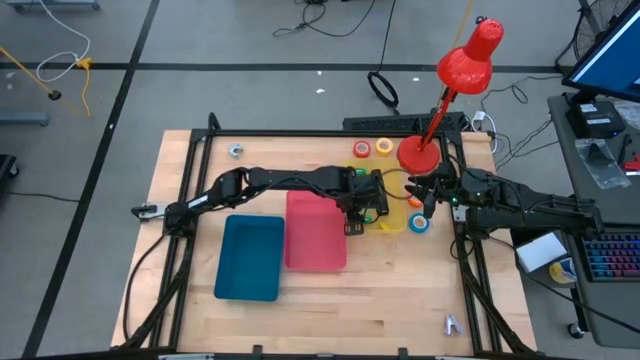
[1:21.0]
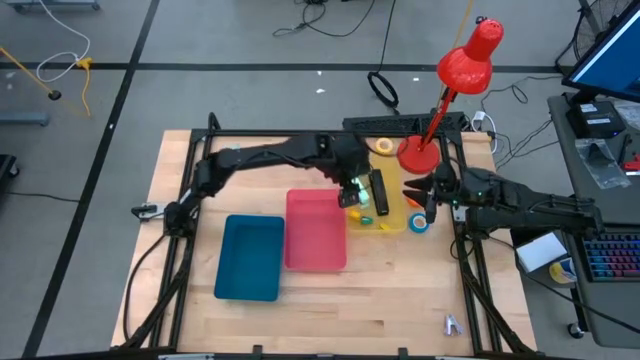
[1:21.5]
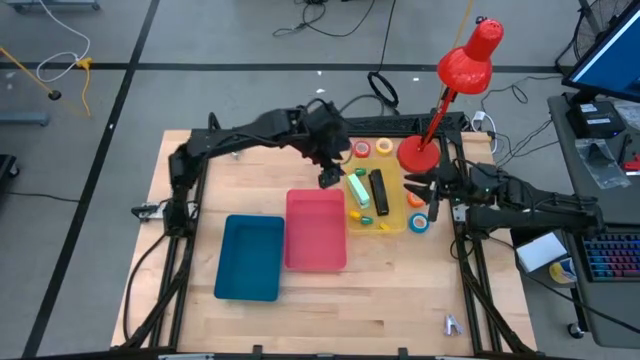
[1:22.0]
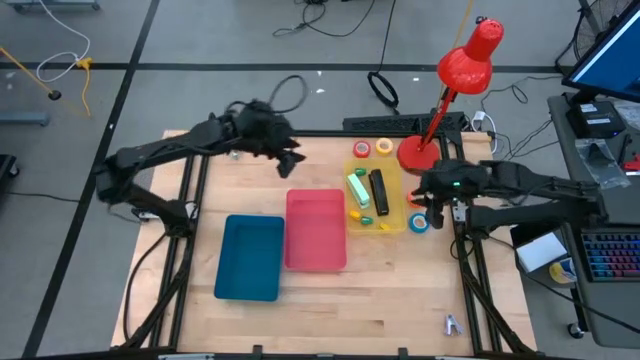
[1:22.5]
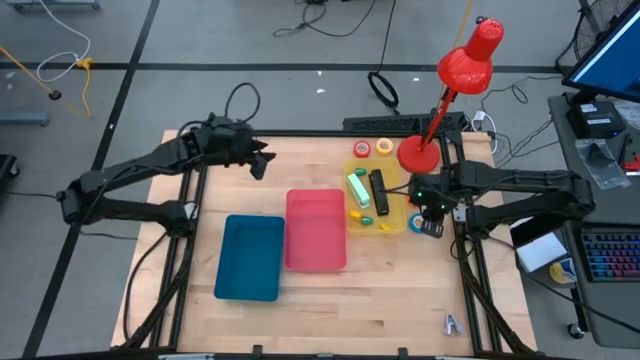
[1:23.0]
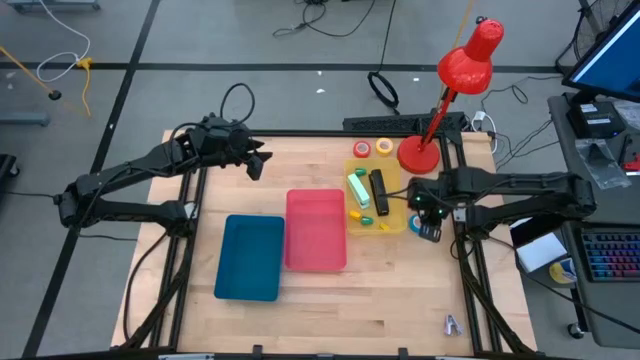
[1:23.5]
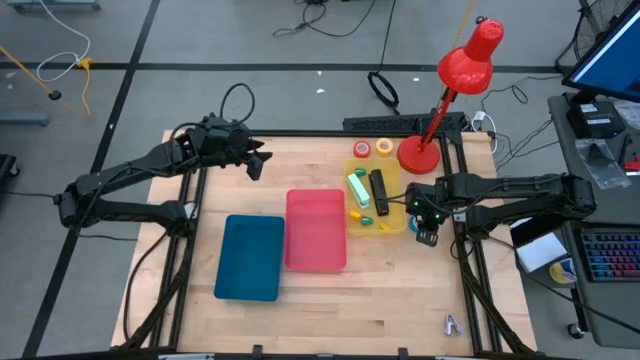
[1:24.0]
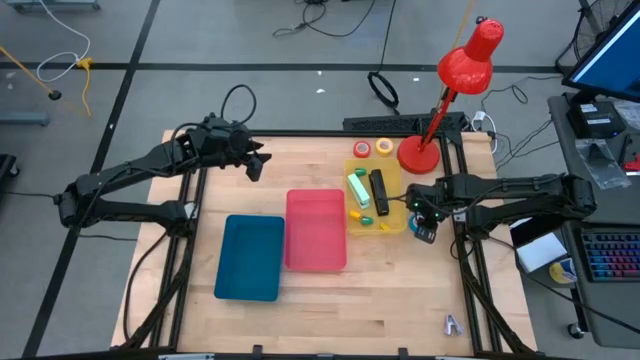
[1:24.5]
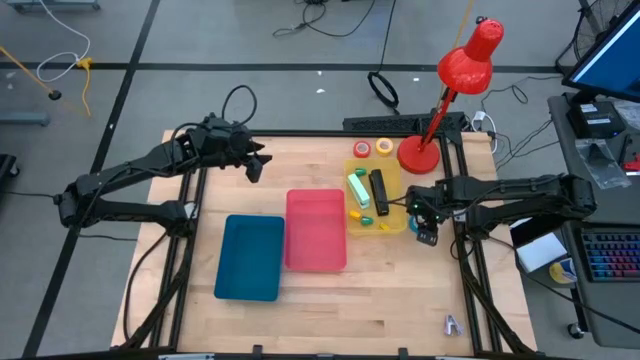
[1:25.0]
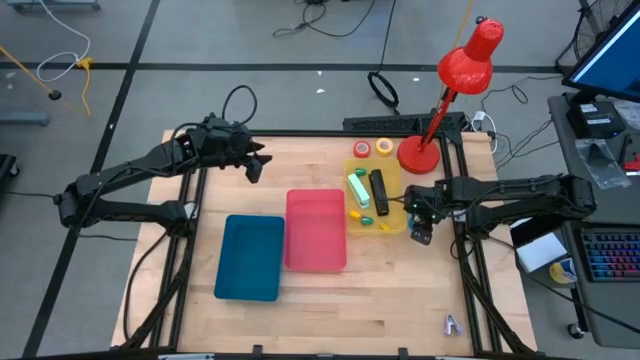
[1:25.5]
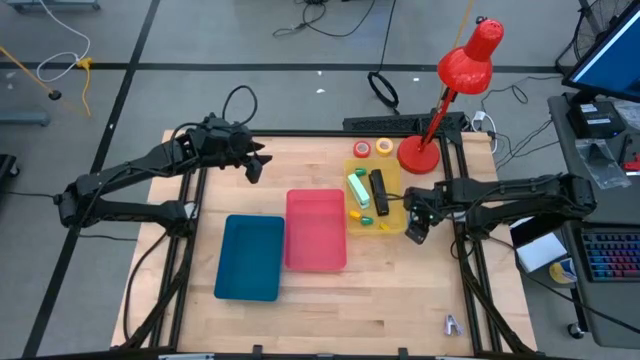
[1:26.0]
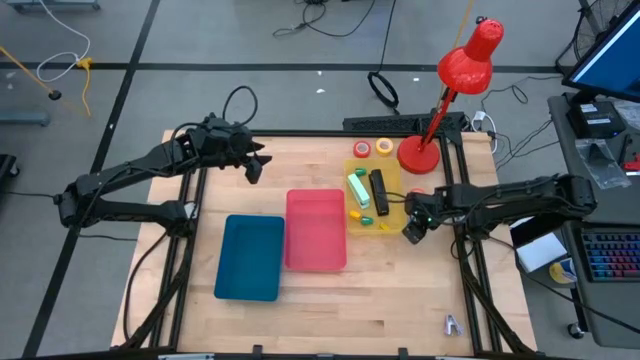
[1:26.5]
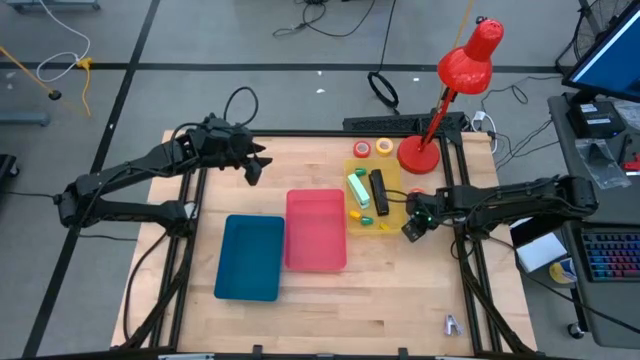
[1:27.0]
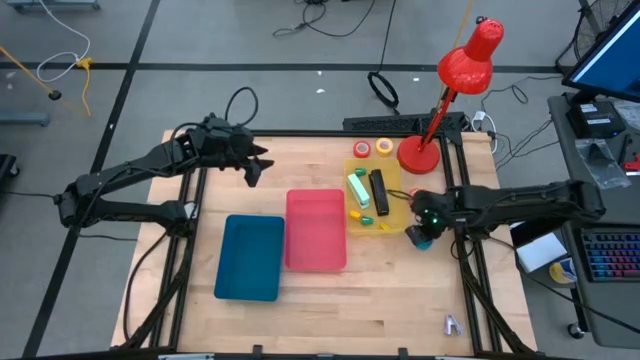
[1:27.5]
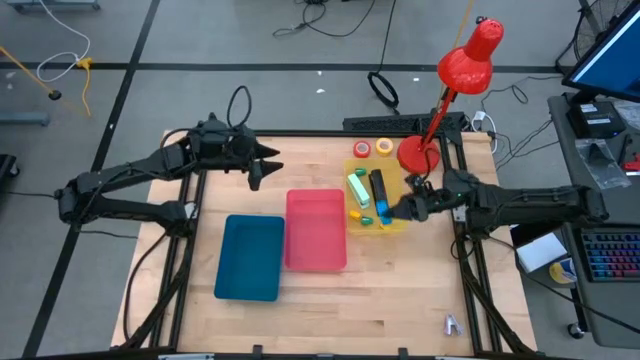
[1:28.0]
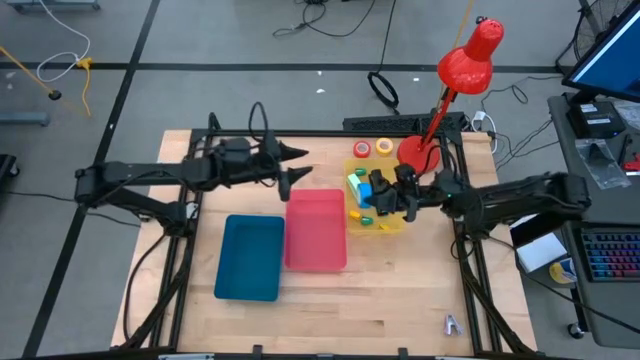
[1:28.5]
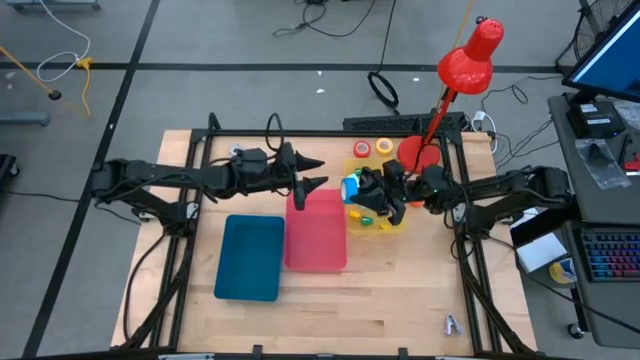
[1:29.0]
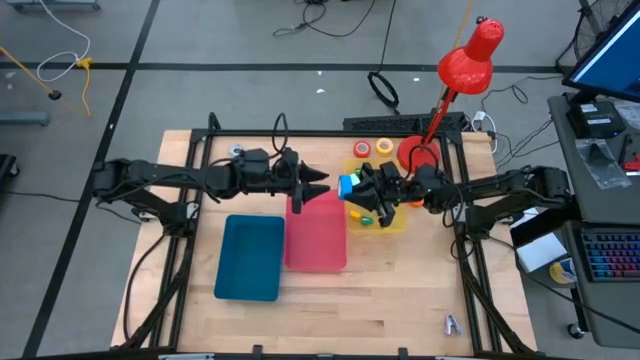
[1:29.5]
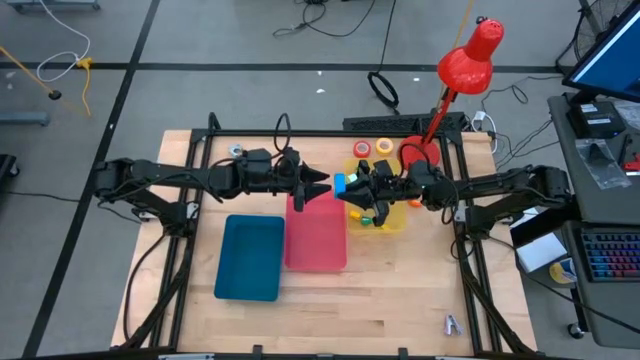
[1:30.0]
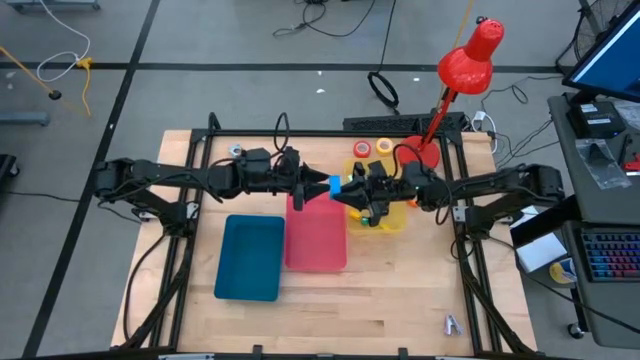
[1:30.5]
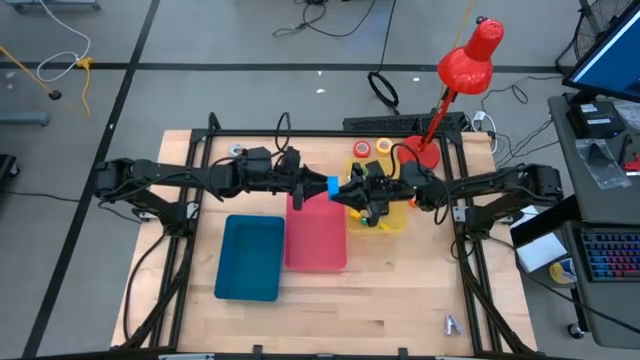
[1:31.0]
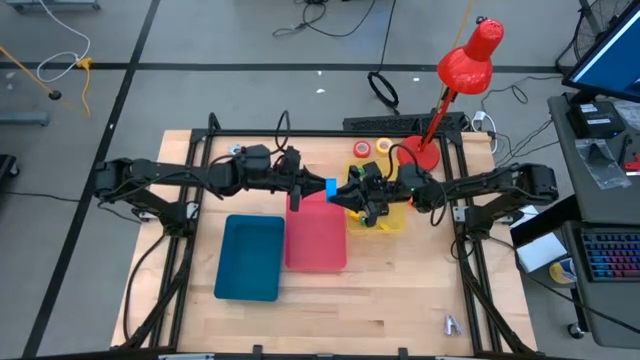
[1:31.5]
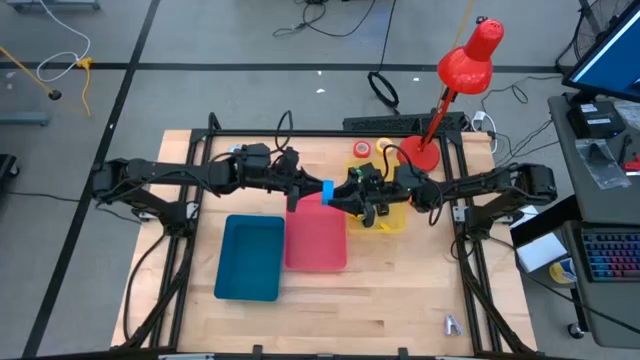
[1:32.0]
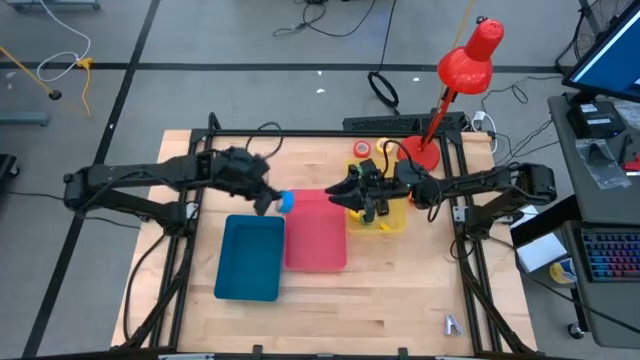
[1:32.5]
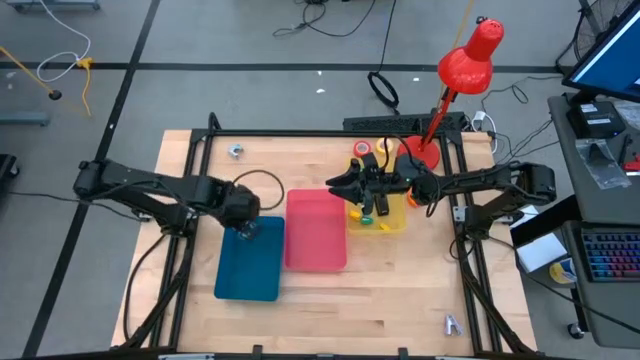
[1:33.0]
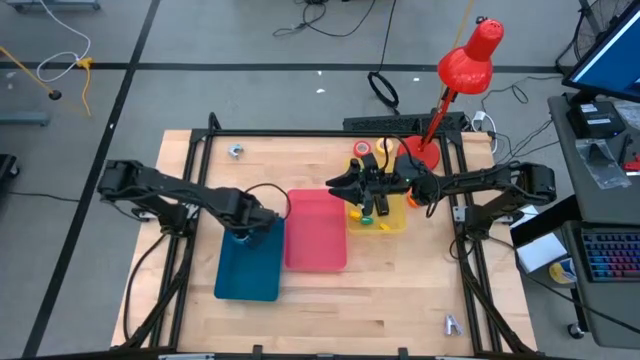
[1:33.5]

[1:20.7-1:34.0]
Task: Pick and place Stapler, Stapler remover, tape
Put the blue tape into the blue bin

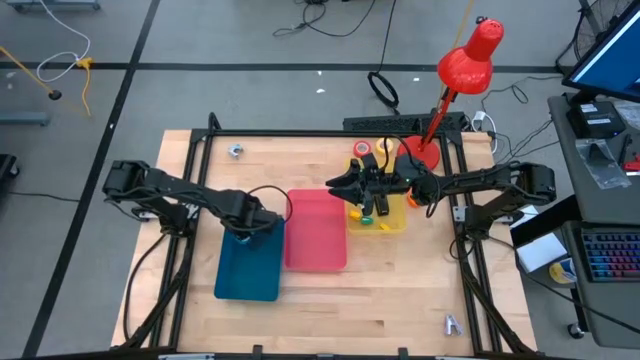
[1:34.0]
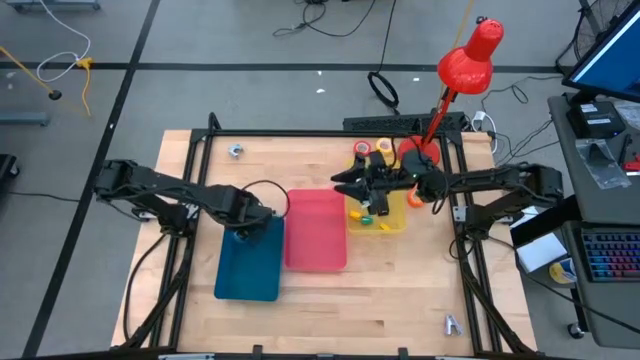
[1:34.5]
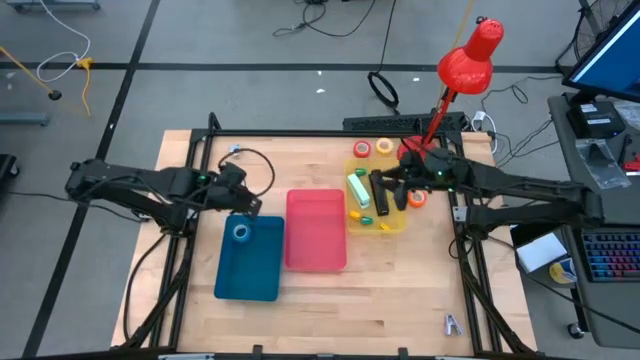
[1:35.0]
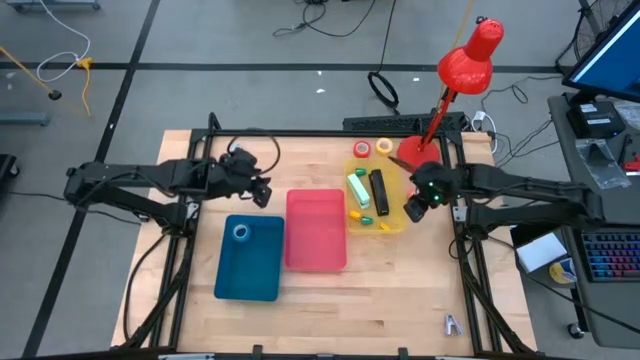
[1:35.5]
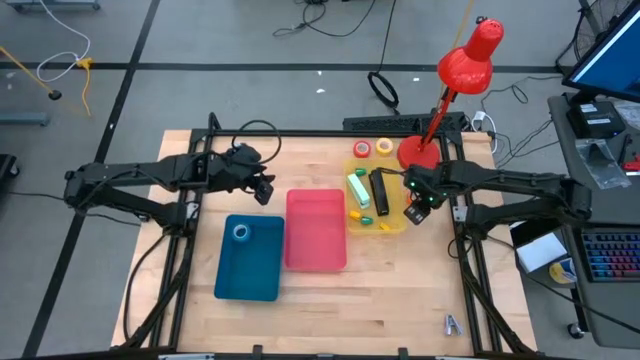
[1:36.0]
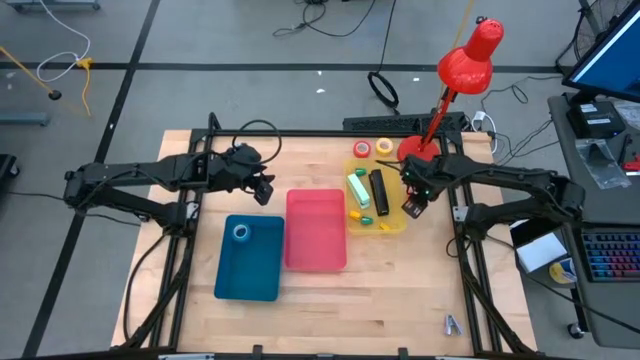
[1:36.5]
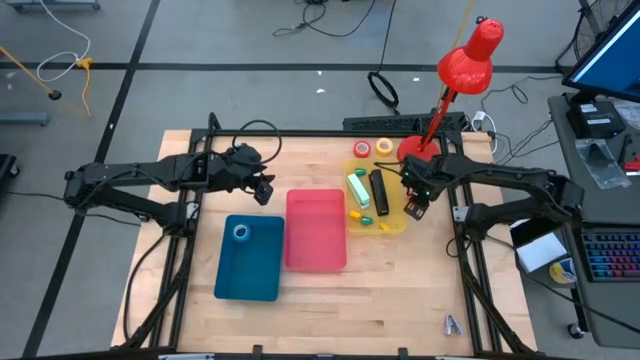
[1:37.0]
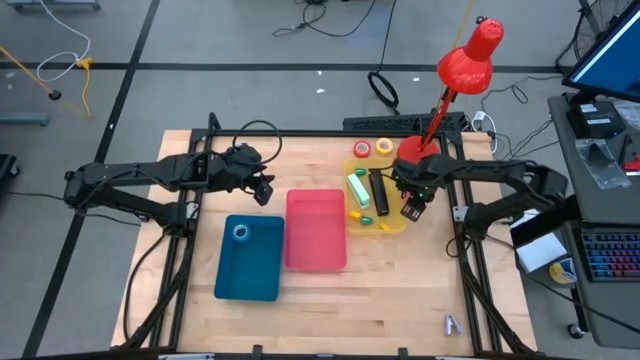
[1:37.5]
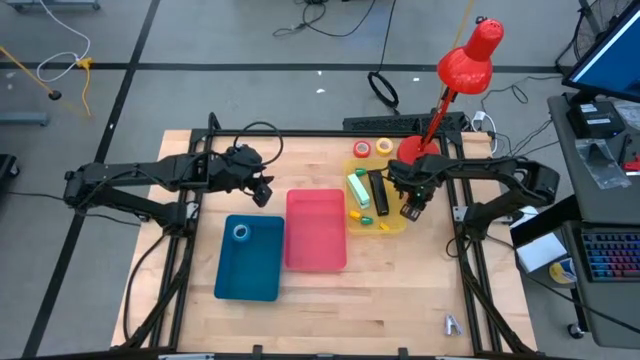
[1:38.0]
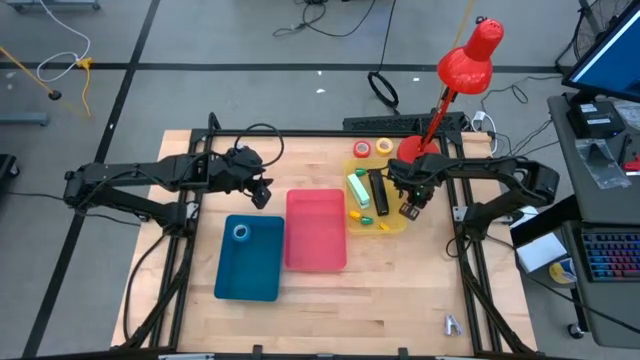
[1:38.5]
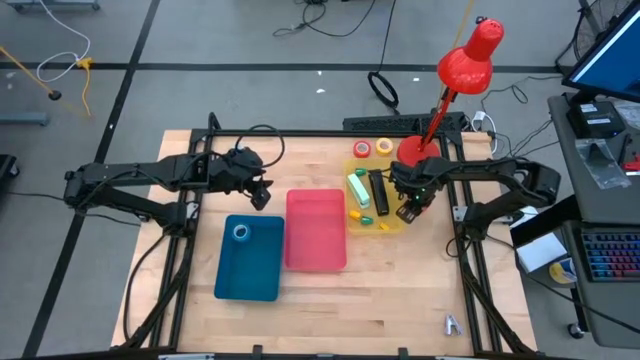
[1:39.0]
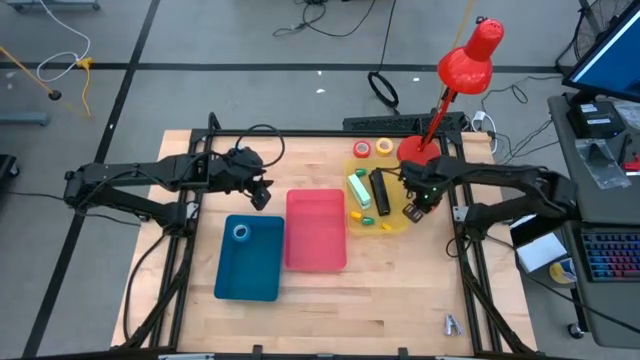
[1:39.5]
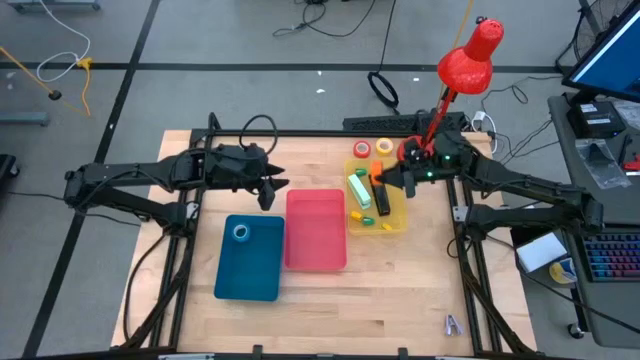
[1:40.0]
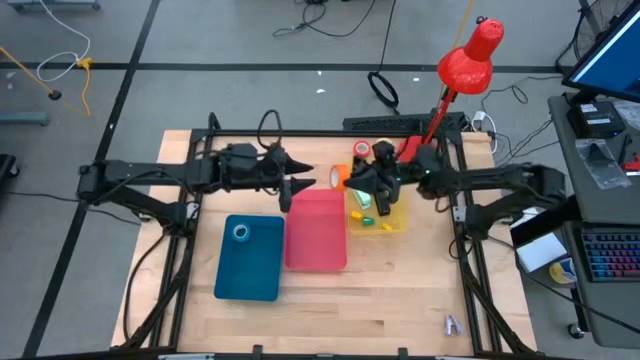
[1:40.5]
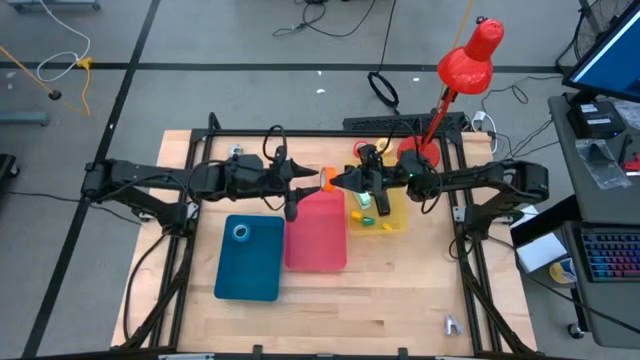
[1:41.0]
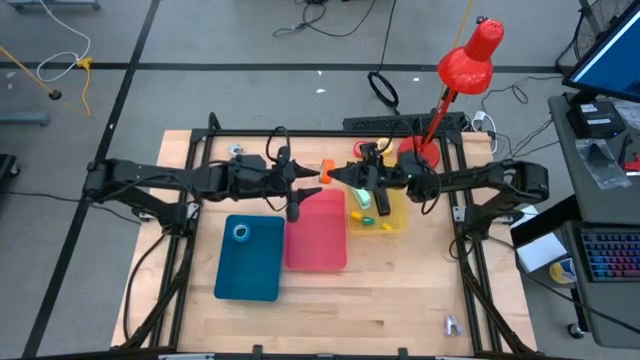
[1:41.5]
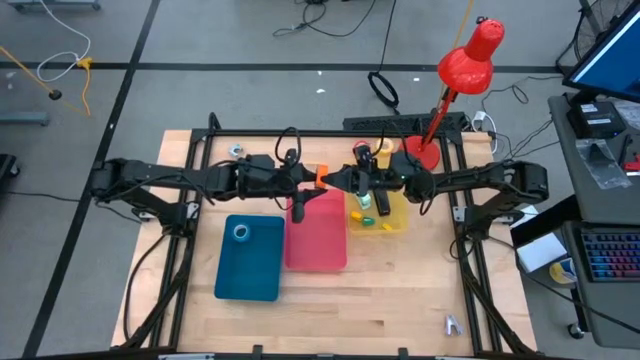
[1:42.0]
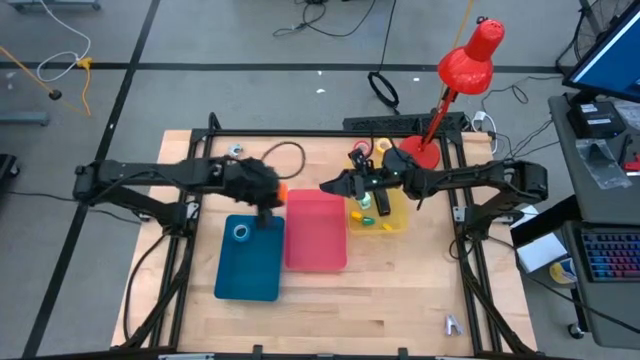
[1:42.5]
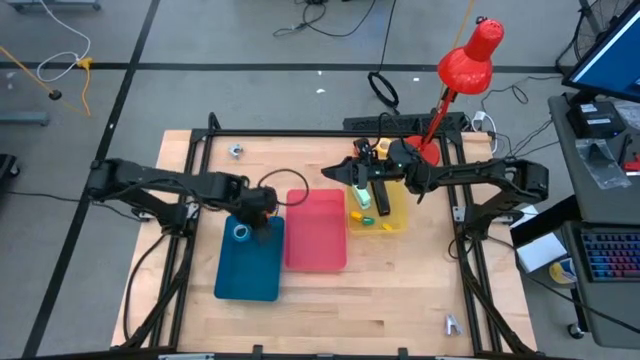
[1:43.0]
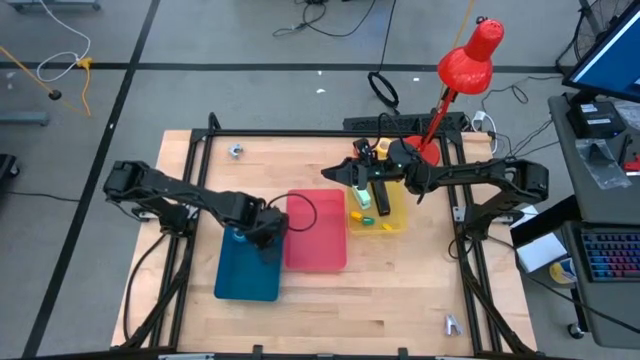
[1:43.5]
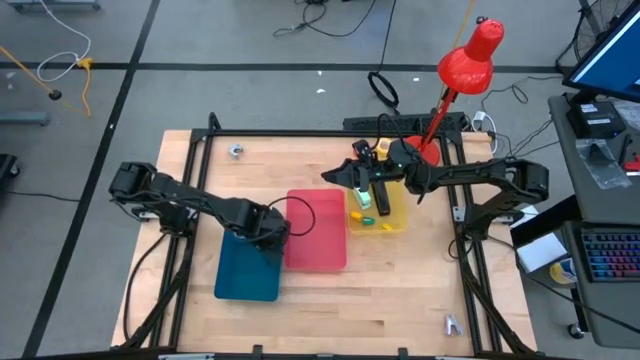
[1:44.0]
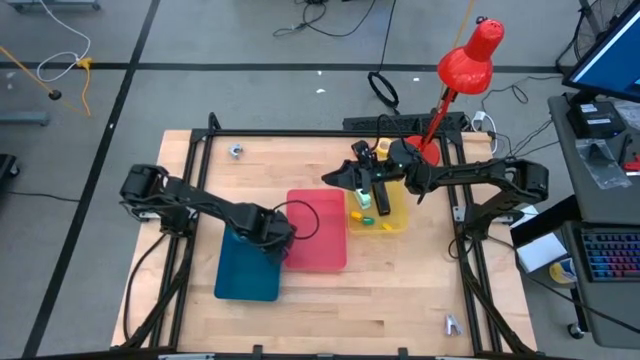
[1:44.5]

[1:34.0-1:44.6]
Put the orange tape into the blue bin
